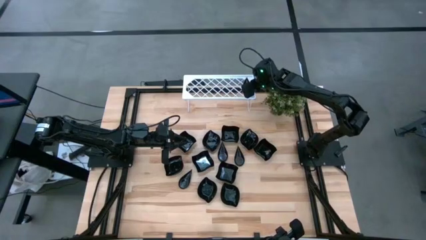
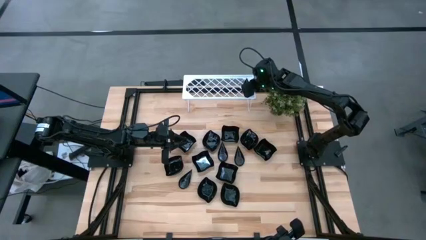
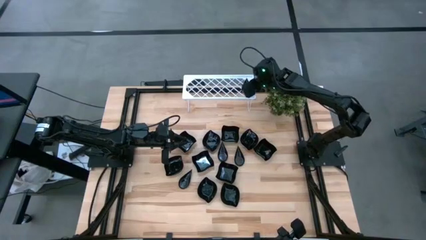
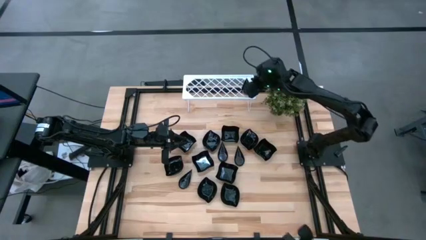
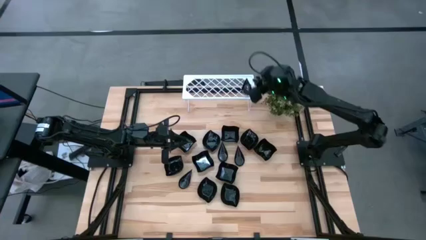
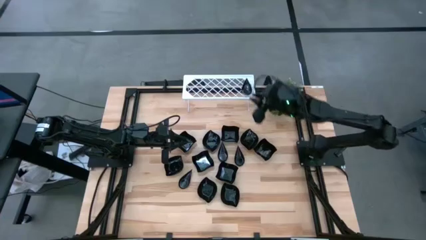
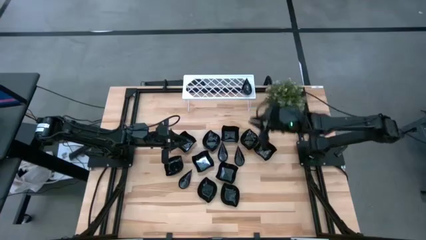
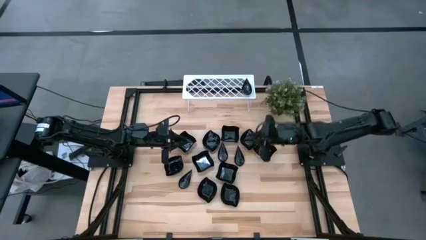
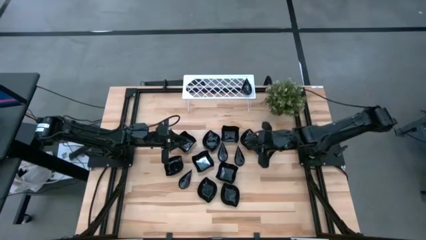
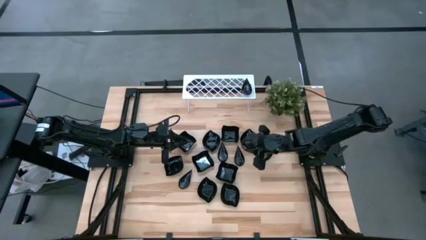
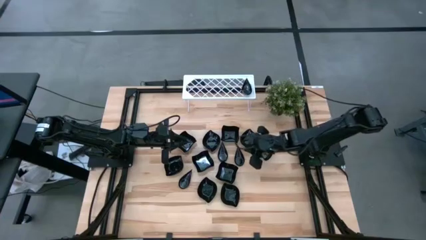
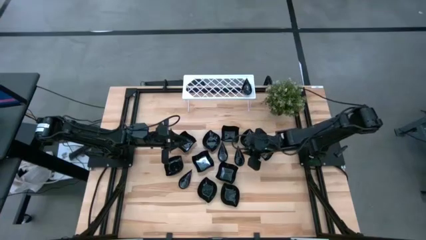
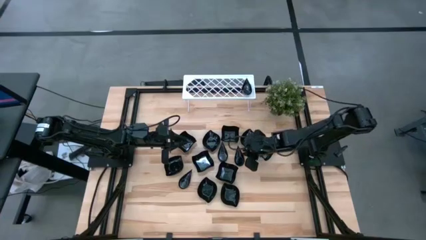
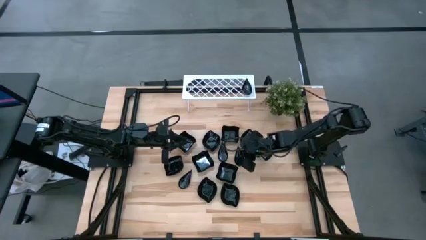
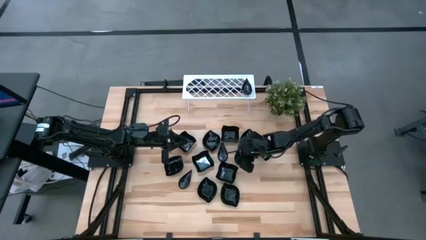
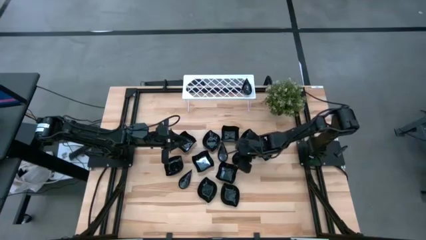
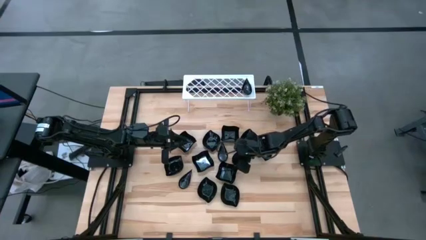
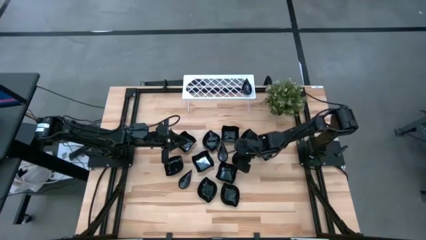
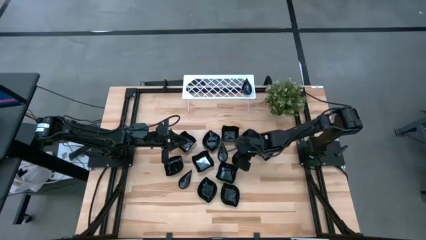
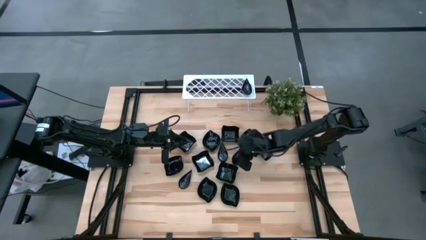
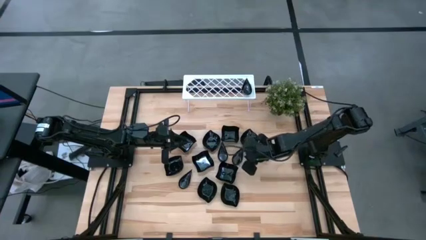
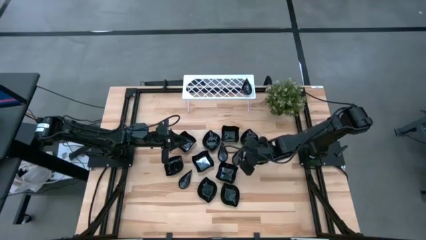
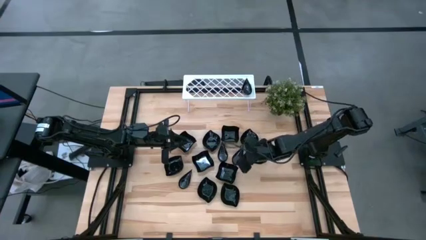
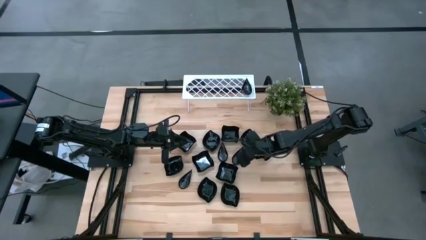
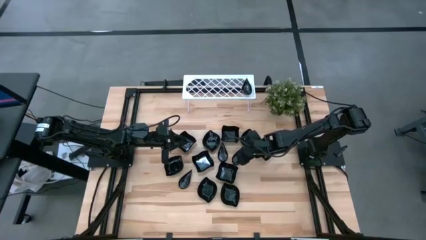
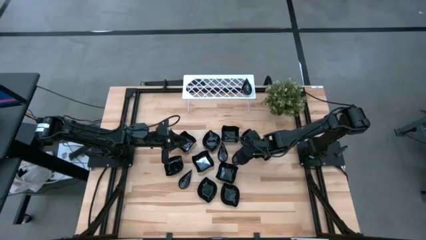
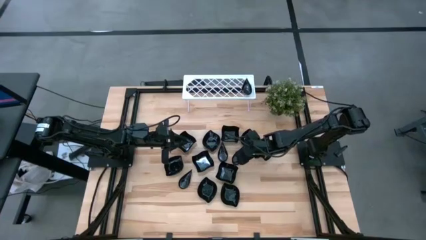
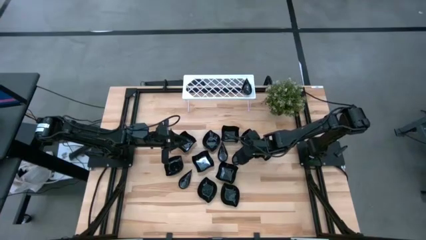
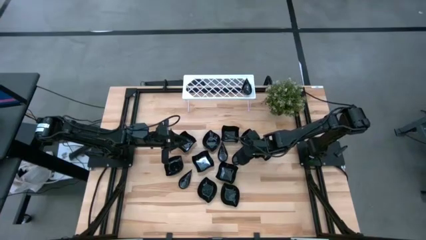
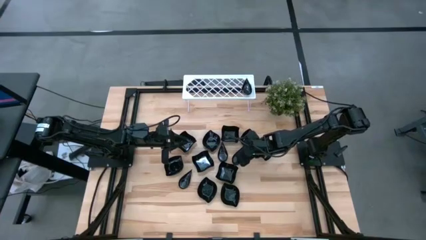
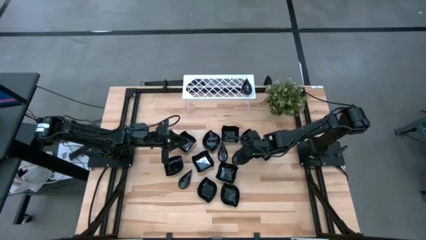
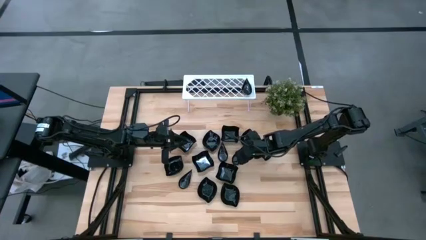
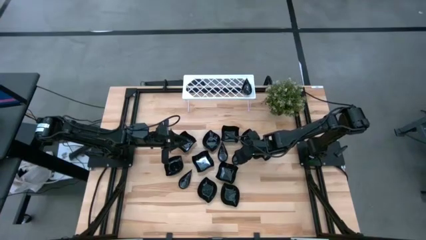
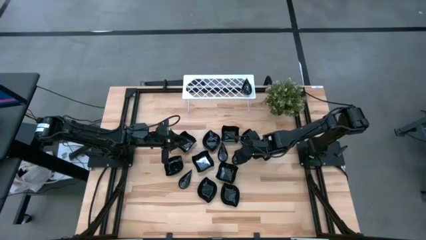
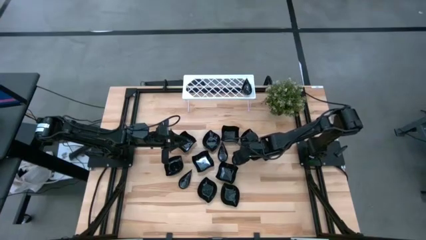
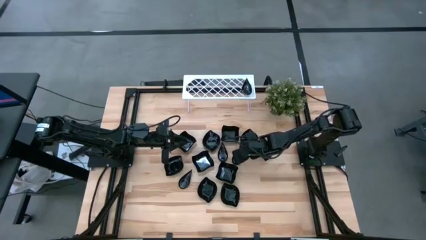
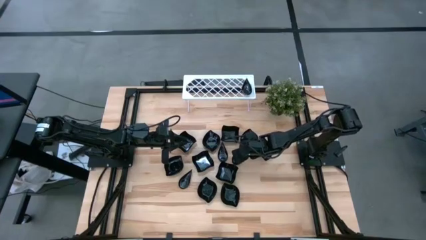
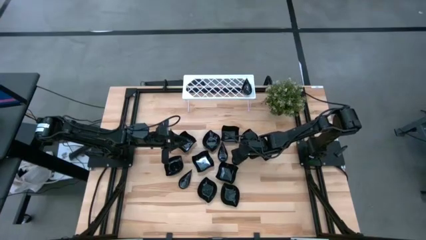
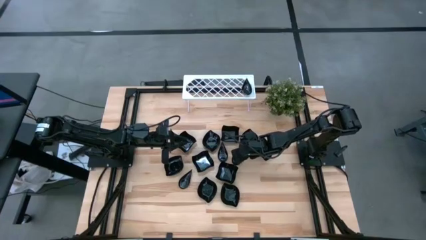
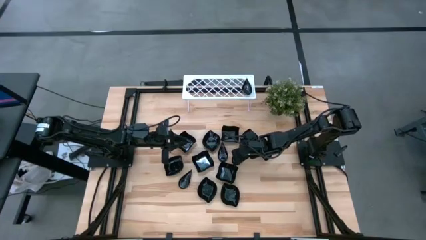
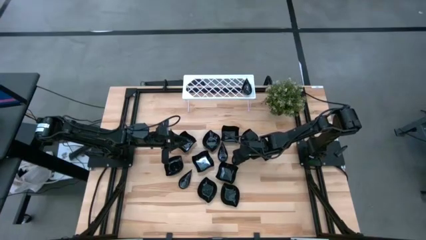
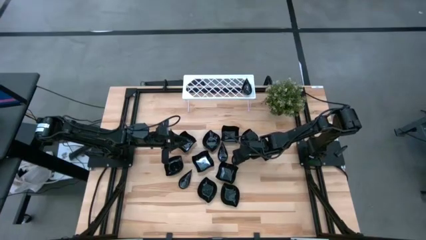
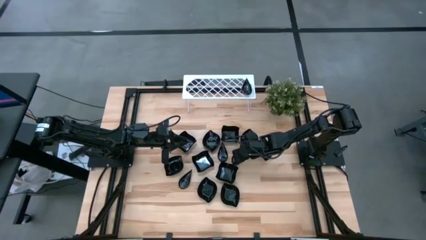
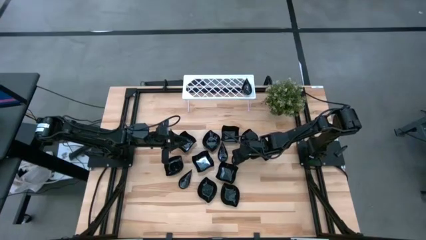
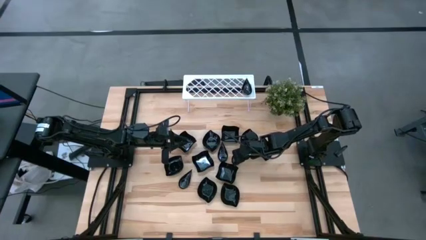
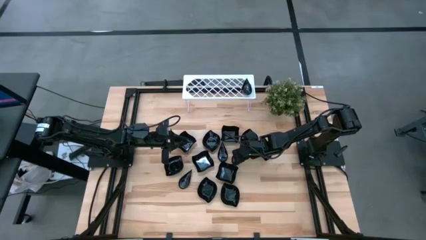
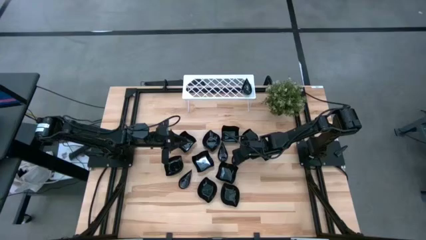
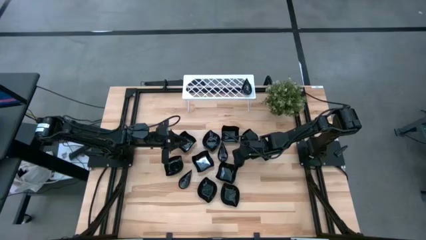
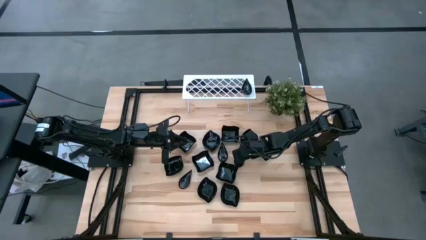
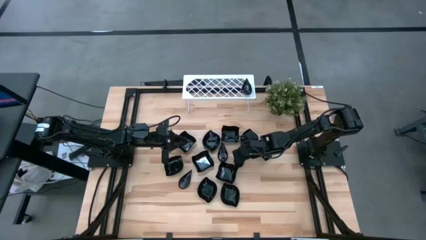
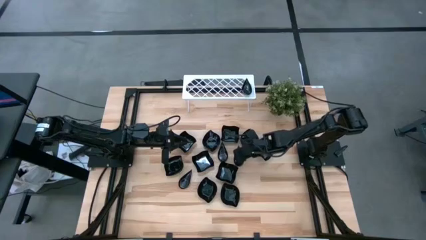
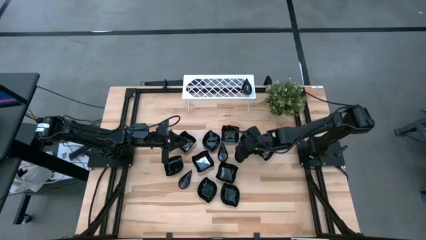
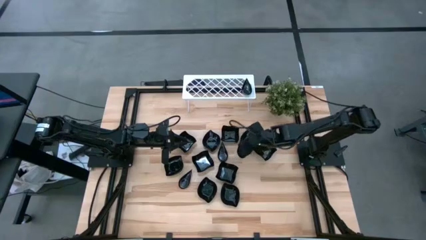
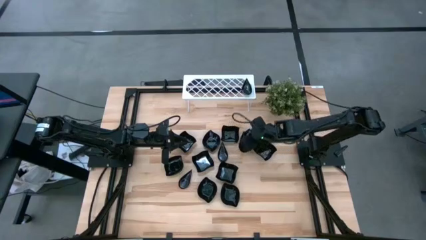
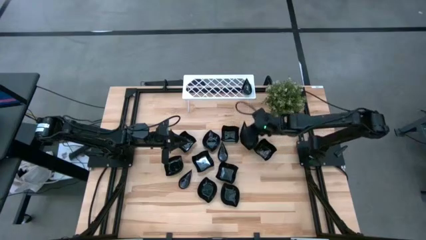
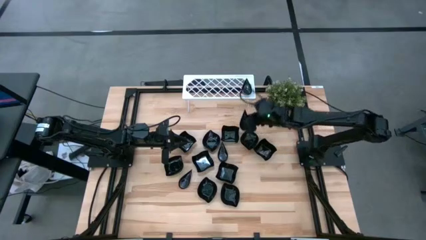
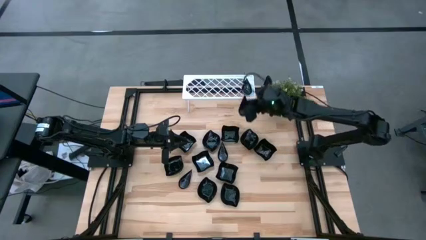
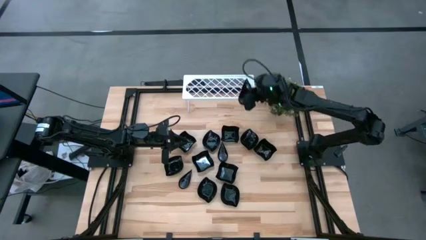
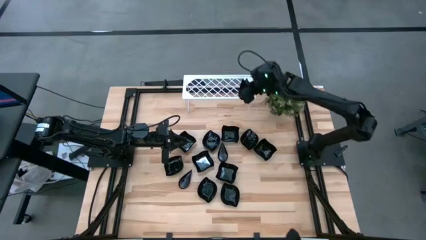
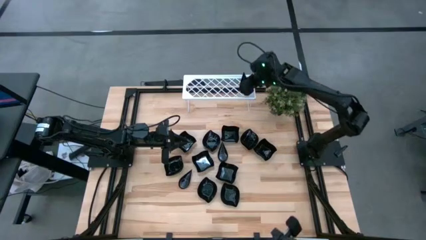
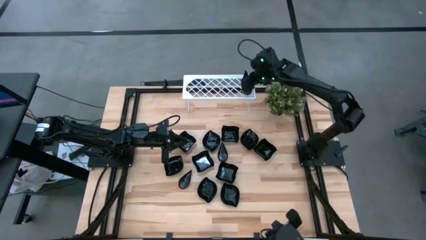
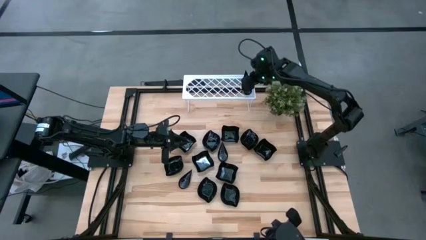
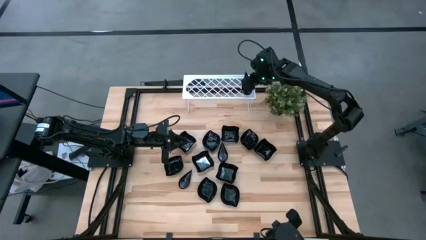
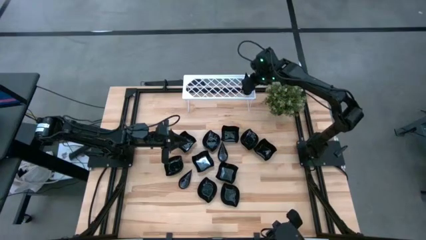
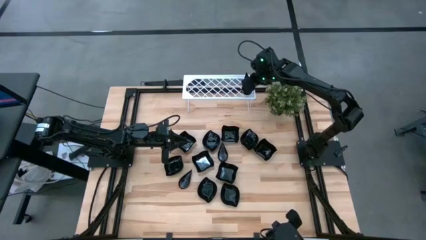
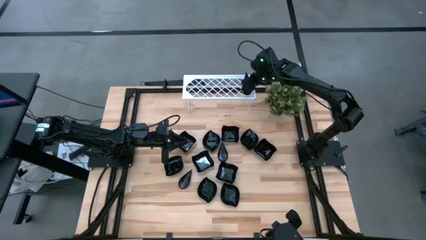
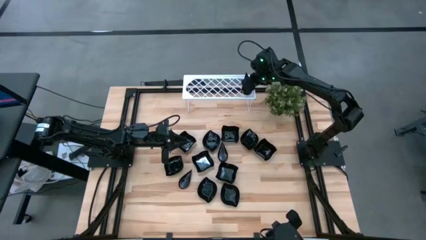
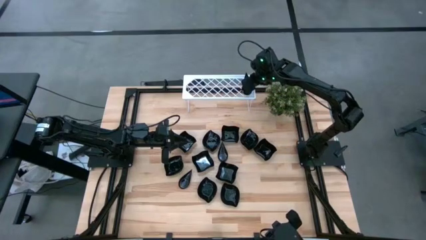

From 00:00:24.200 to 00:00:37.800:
Task: Pick & Place Mini shaped plates
Stack the drop shaped plate on top of the drop shaped plate on the shelf

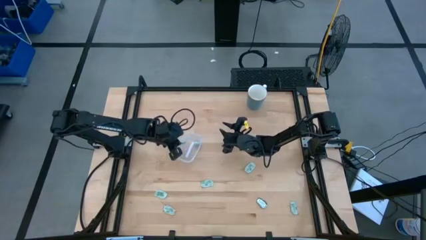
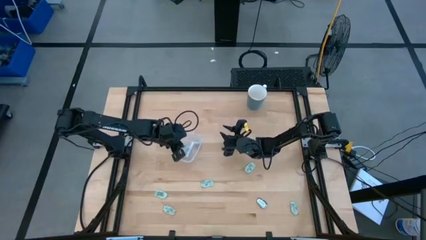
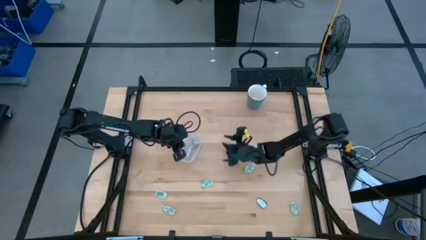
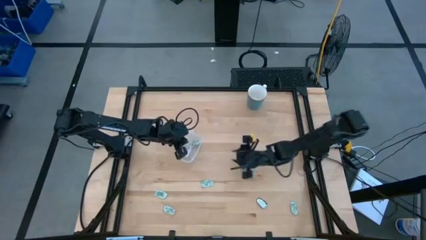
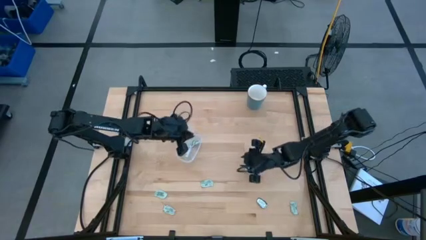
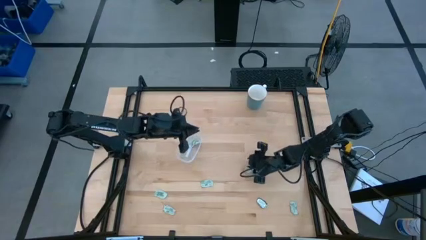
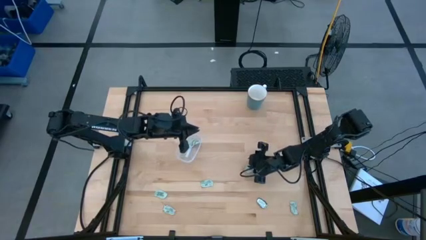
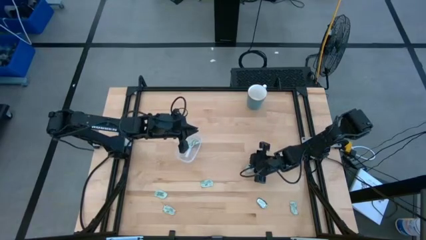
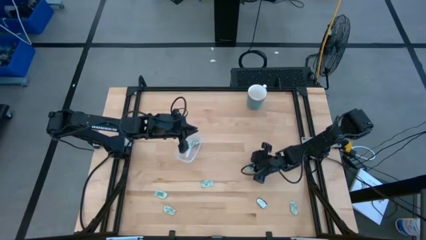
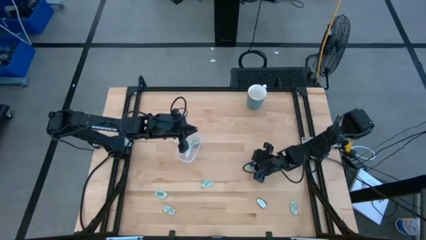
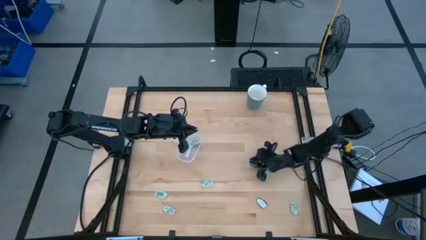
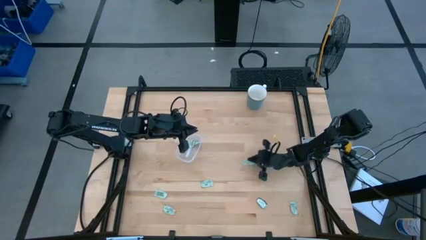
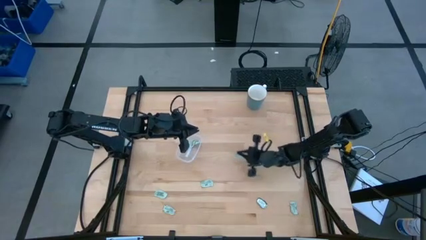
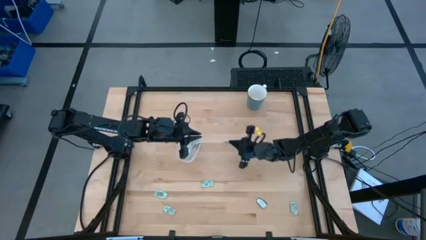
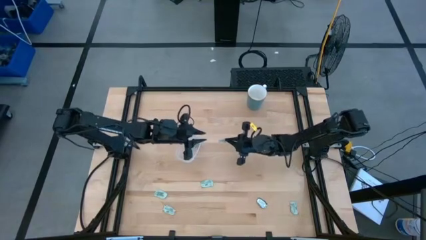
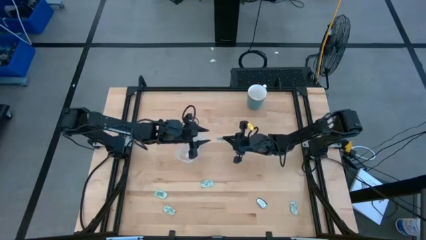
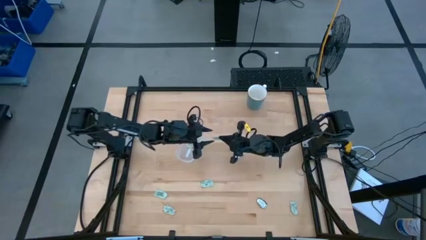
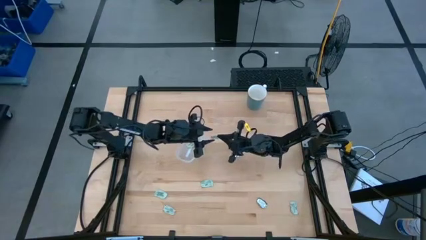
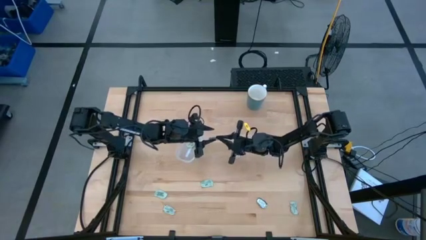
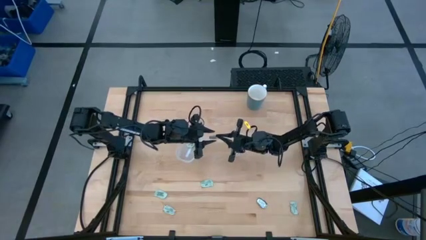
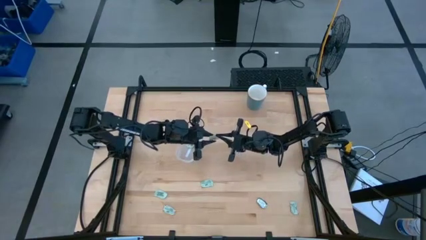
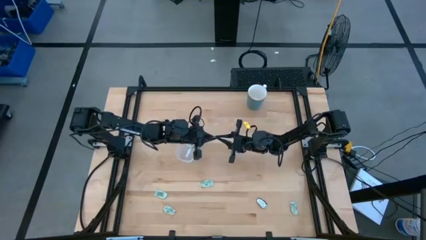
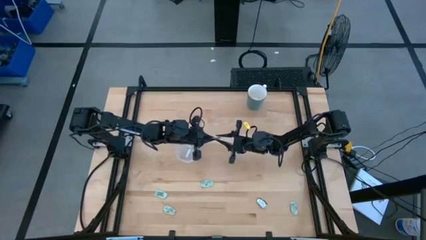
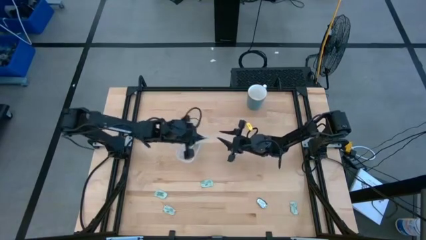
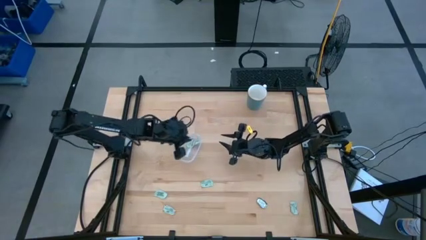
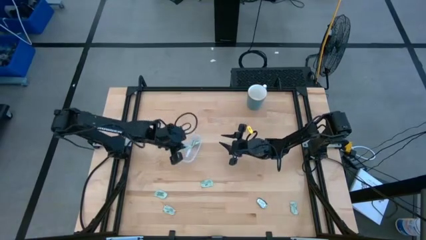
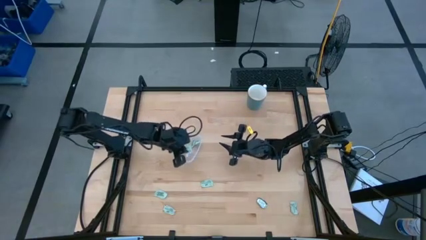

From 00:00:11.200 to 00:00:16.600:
Task: Pick and place Stevia / Truvia into bins
Put the green stevia packet into the transparent bin
